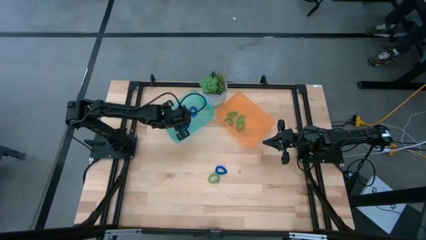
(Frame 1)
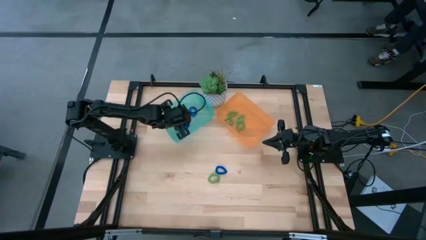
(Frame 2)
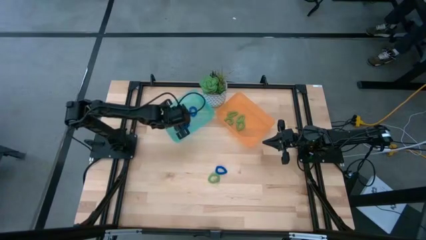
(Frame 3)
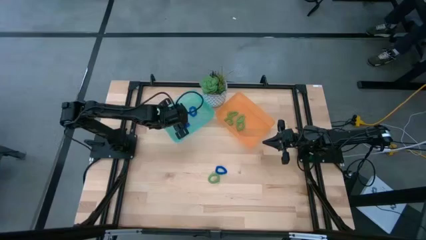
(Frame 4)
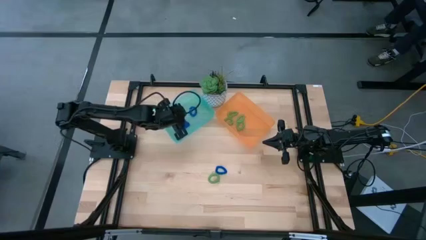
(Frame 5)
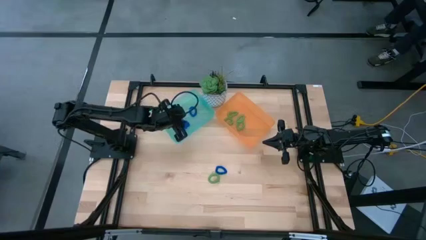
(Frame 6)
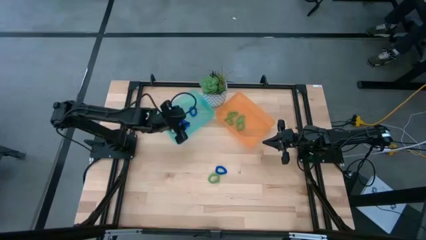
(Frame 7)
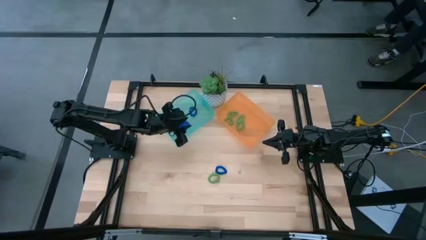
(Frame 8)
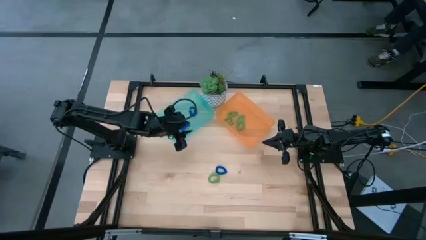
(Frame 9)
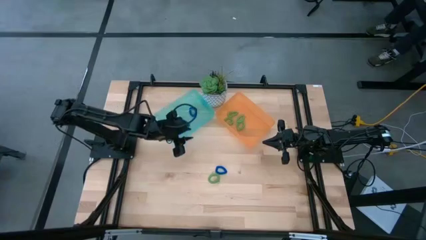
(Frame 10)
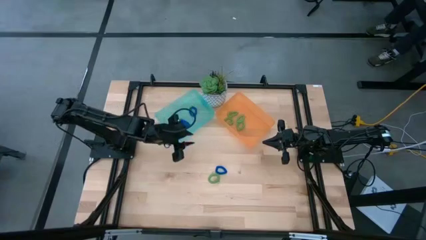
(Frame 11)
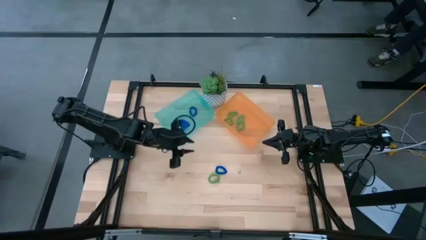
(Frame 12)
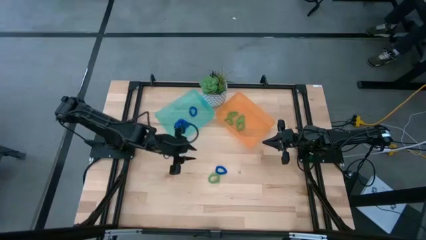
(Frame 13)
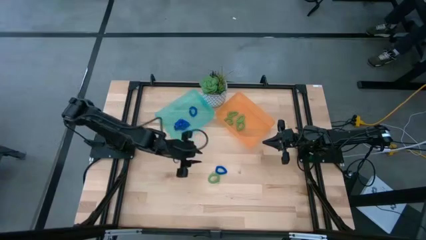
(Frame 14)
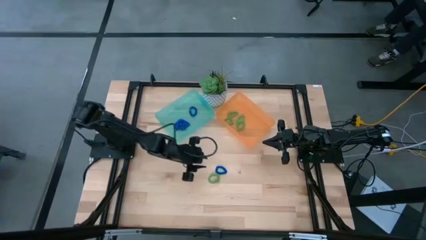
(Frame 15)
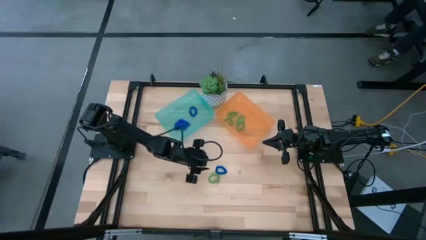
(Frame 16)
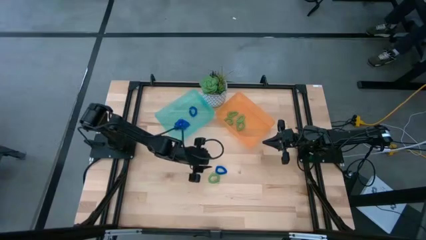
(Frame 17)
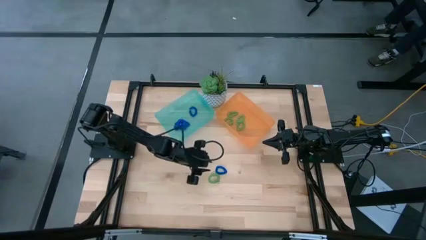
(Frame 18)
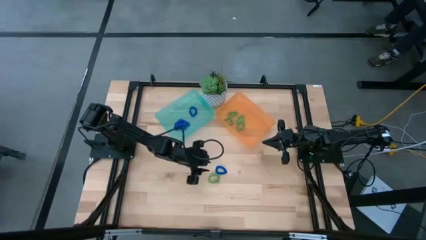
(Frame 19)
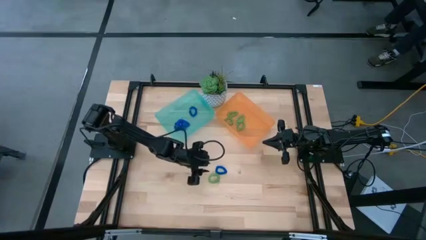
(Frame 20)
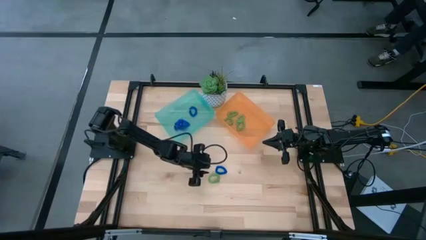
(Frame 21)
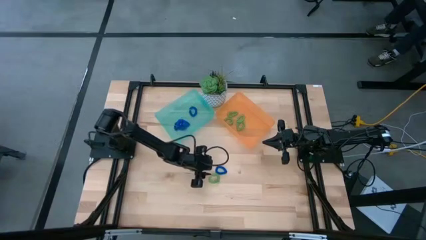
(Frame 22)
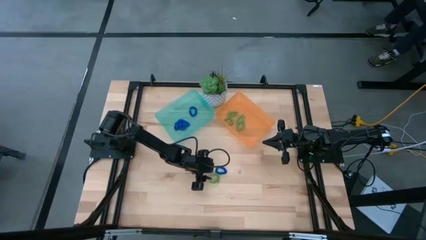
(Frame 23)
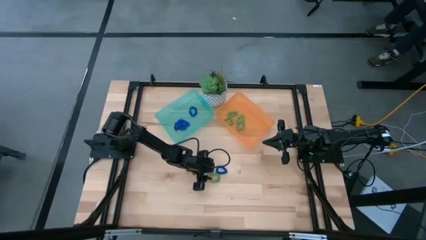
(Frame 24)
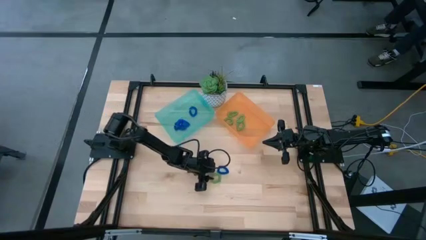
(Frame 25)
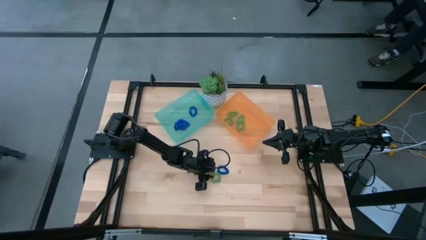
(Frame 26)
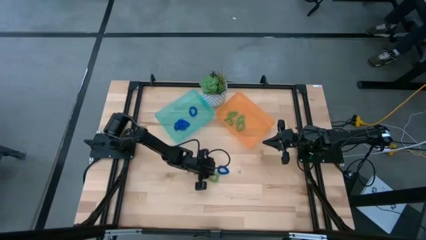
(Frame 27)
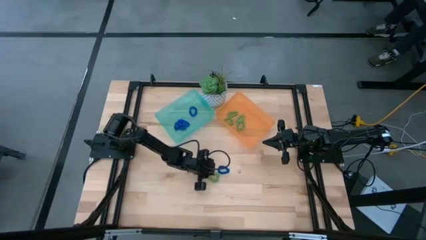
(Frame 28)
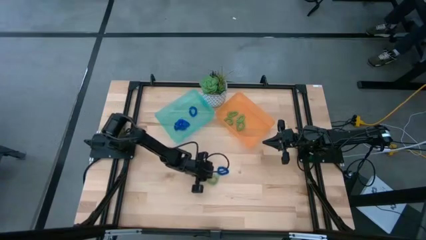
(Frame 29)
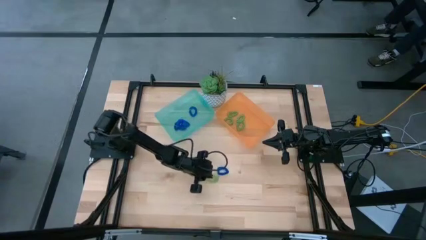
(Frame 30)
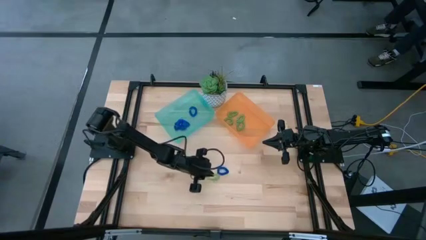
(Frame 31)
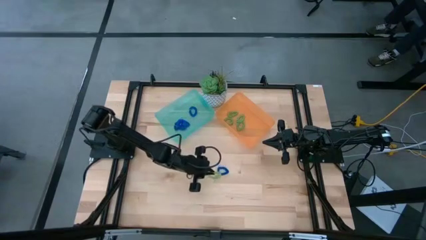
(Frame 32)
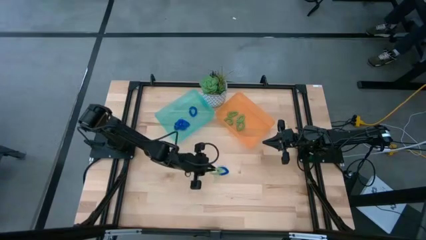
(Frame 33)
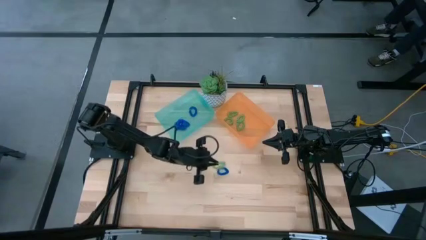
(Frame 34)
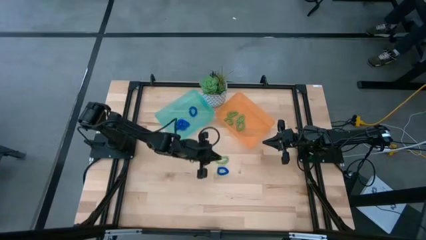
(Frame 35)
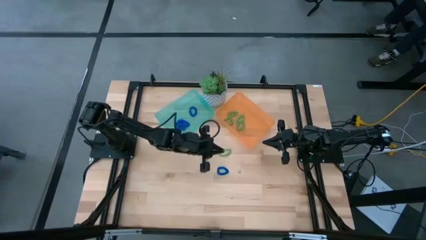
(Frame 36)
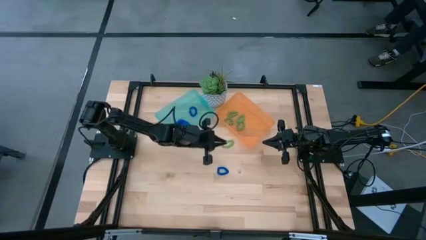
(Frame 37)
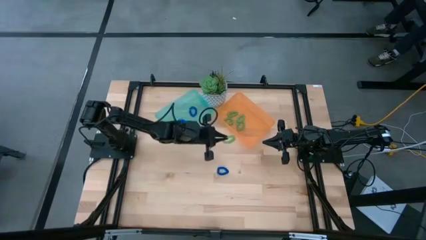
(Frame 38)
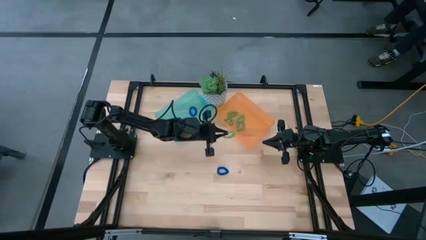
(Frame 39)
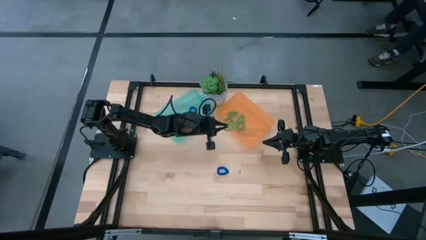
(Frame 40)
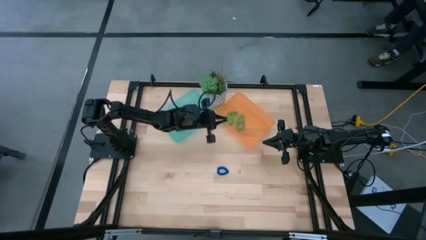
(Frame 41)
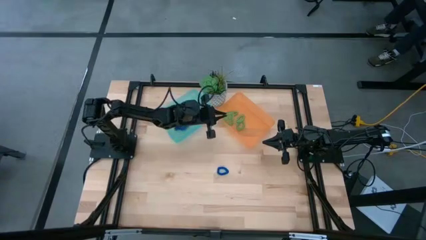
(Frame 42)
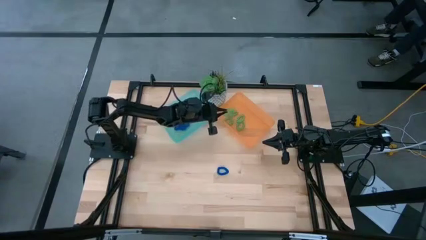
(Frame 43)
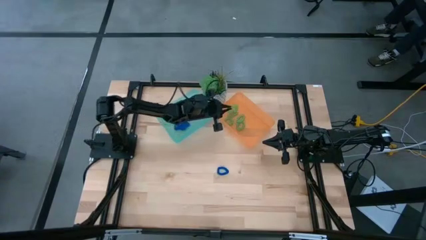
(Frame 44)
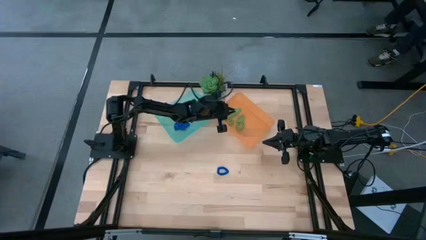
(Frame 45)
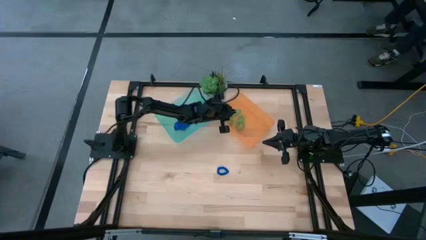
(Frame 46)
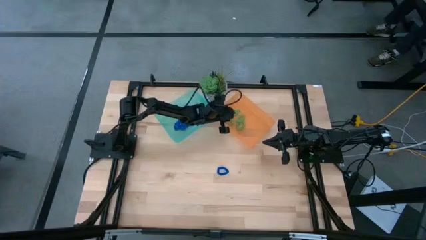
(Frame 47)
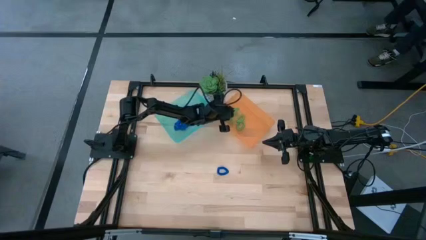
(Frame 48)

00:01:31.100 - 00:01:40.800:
Task: Sort spring keychains
Put the green spring keychain into the orange bin

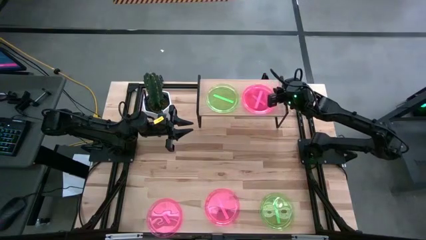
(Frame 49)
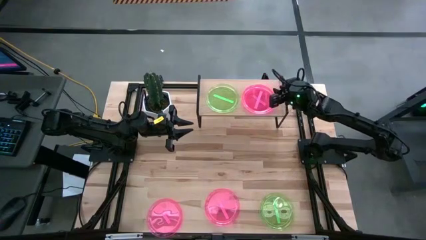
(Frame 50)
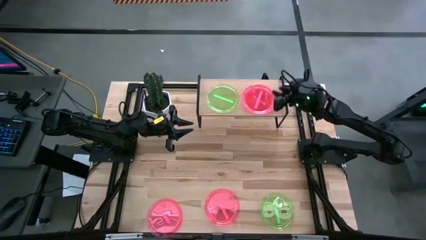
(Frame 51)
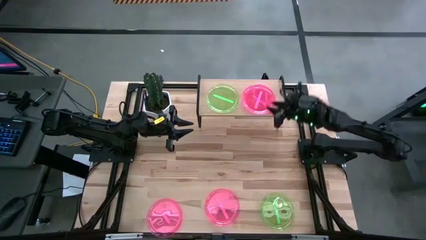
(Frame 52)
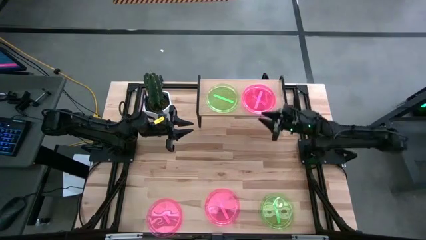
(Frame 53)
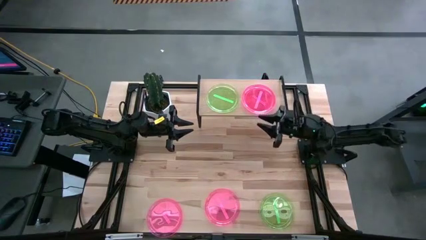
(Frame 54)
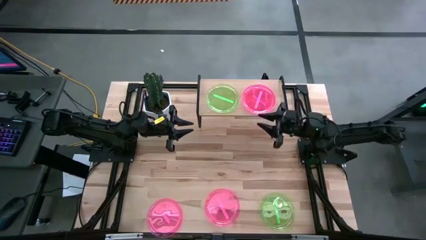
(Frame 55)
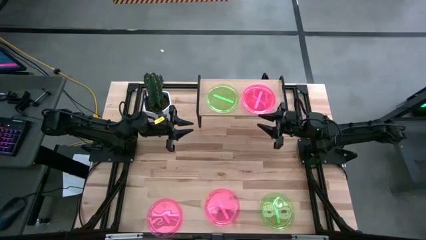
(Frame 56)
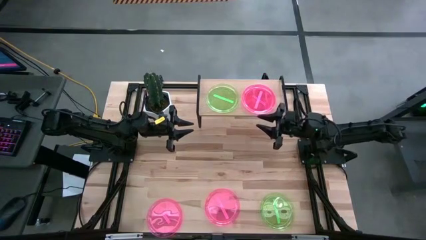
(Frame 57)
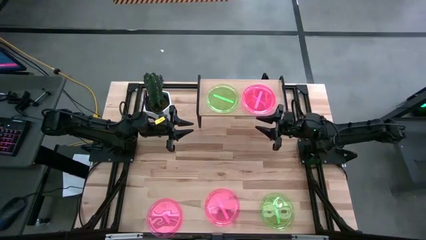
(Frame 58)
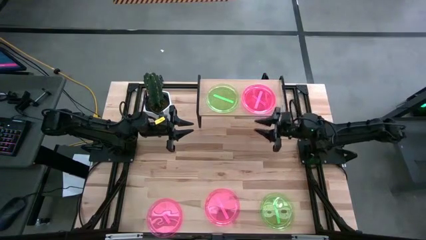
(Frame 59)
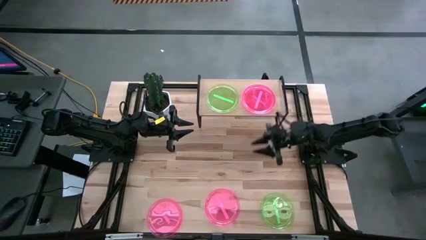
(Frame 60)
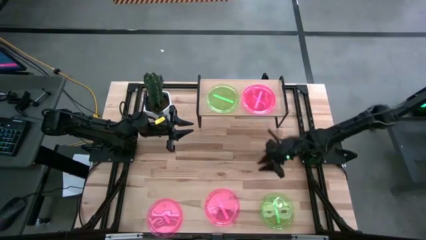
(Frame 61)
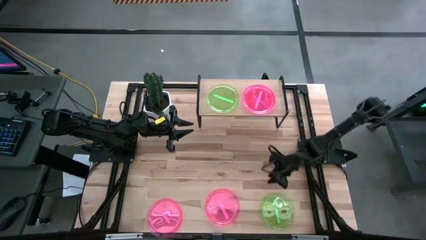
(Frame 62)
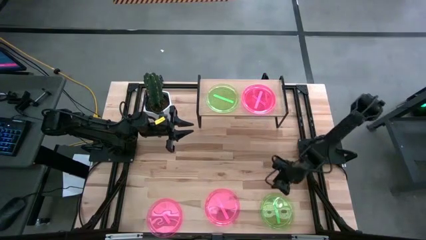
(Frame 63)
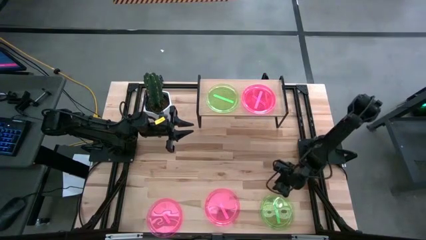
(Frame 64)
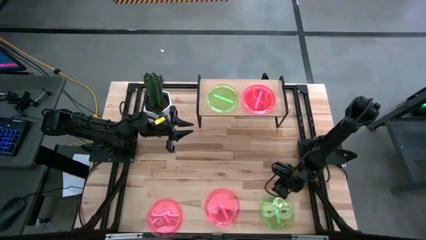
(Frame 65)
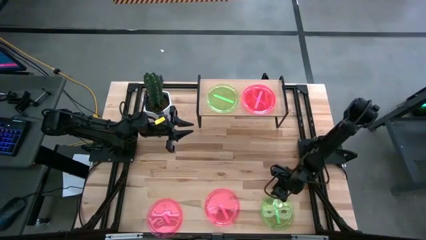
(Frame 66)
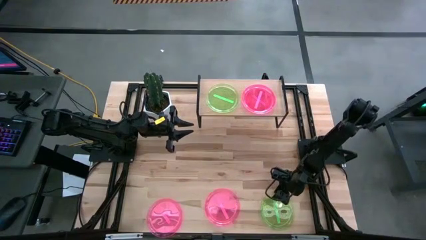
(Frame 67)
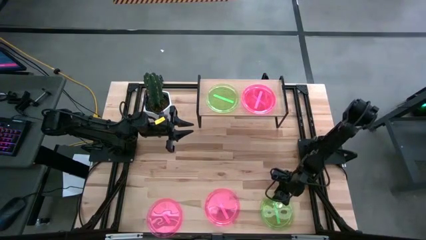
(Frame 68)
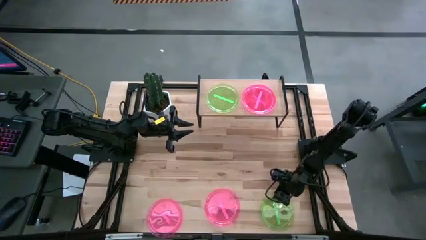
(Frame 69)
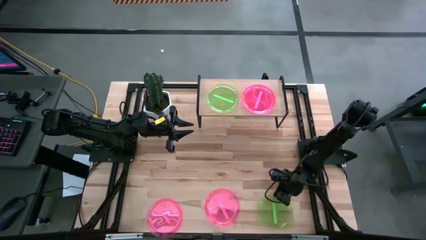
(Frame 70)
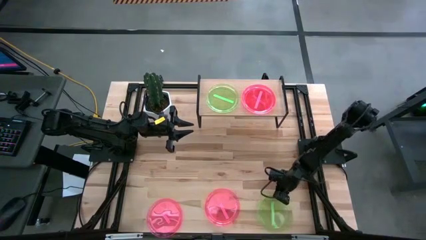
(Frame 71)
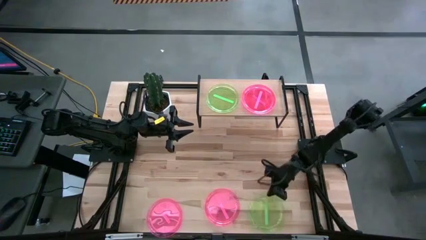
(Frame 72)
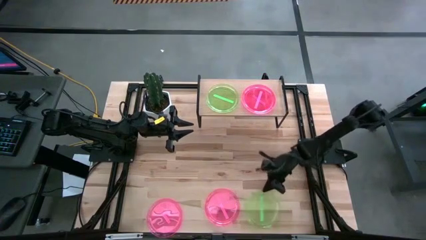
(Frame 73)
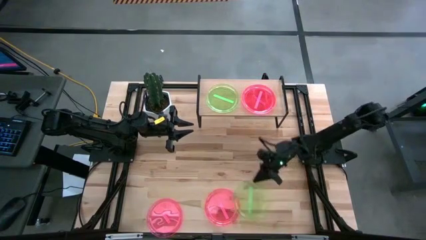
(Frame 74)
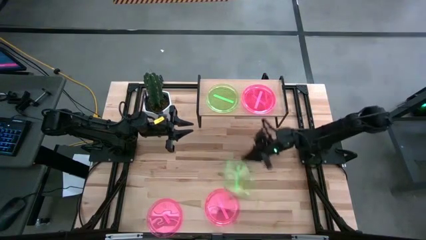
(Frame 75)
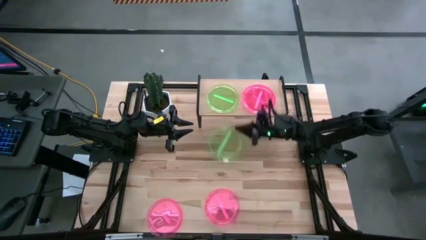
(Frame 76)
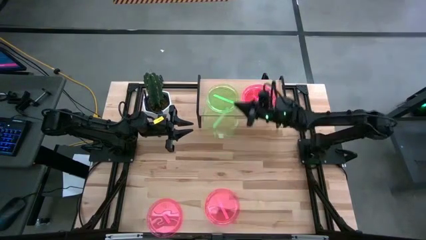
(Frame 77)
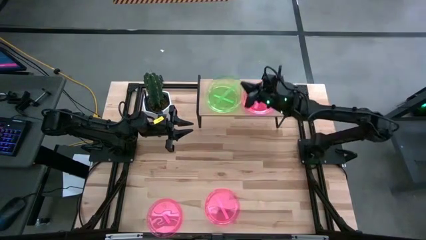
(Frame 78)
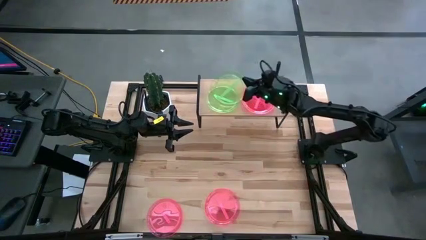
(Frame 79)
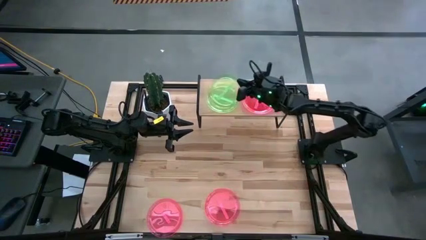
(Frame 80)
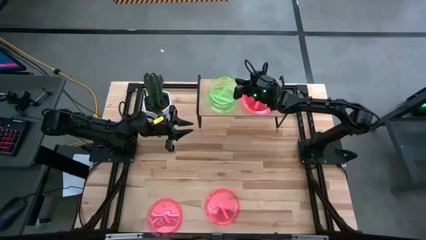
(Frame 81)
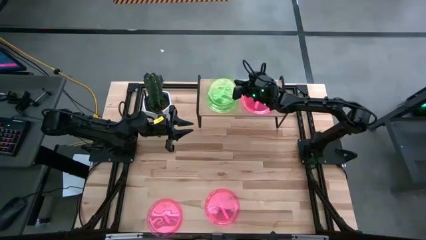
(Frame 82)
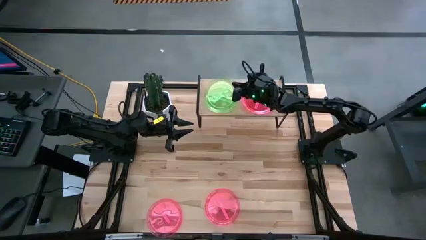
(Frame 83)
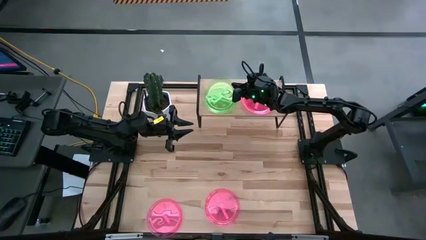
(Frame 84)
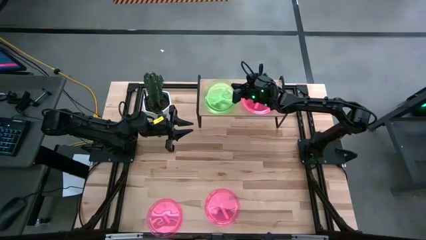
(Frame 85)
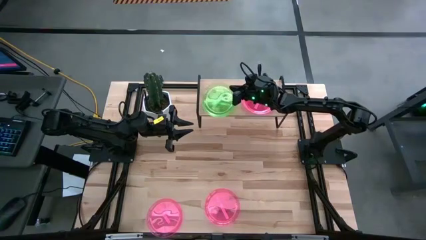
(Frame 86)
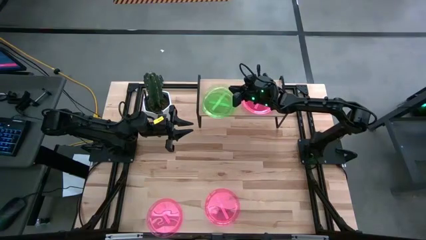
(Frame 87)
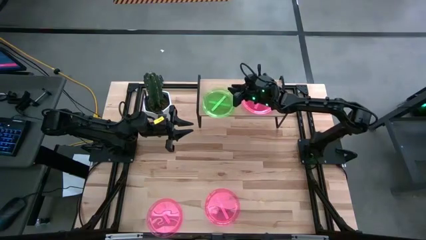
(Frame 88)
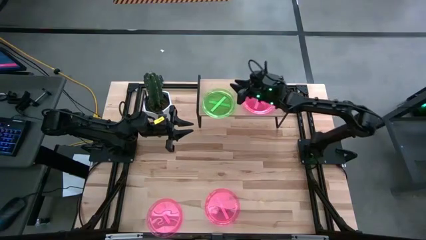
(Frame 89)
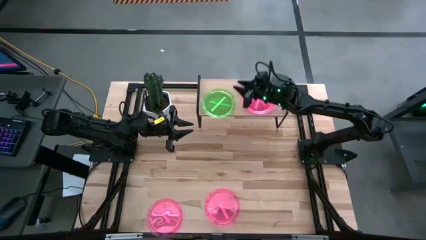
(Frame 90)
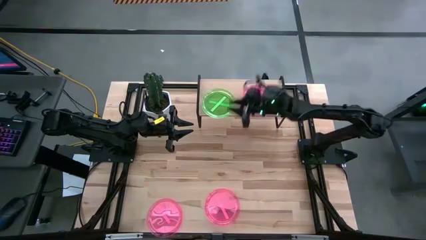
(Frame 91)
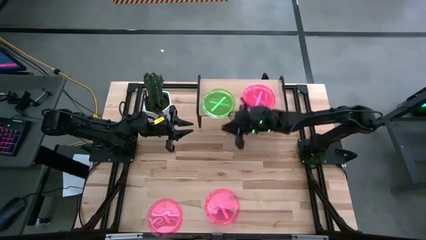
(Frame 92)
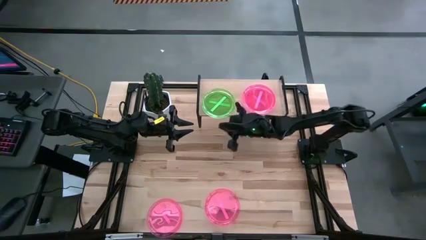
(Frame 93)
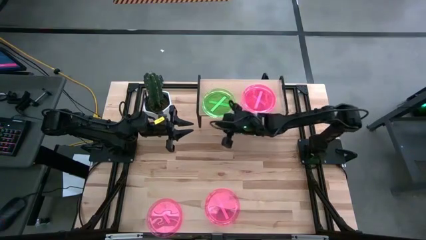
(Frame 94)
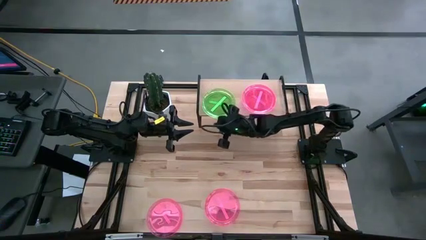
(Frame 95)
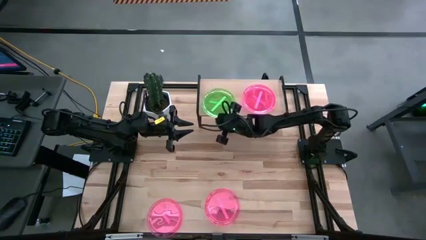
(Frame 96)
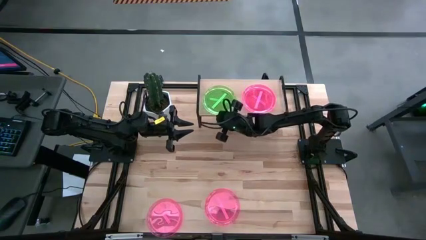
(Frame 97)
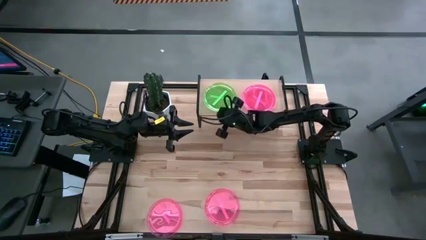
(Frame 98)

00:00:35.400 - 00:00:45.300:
Task: Place and stack plates onto a shelf
Stack the green plate on top of the green plate on the shelf
